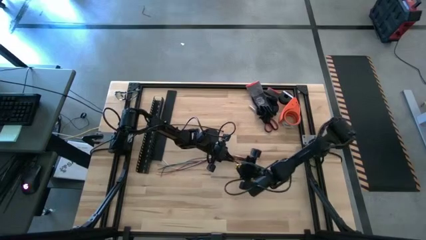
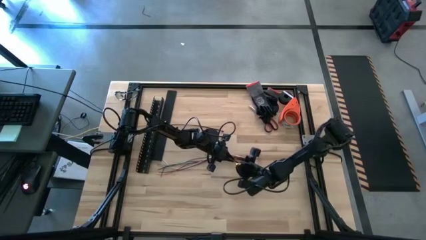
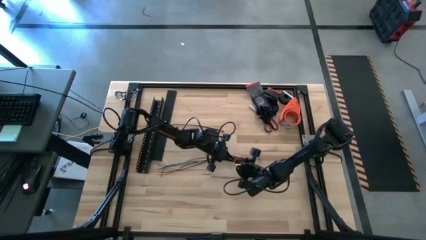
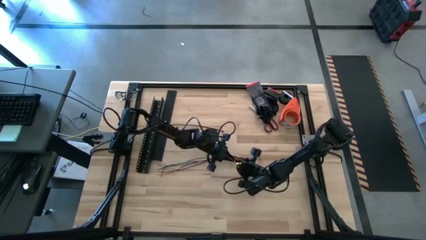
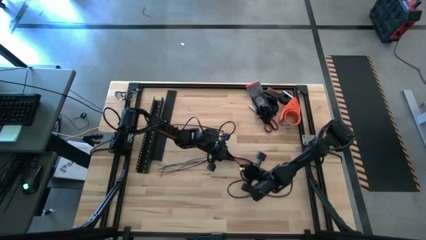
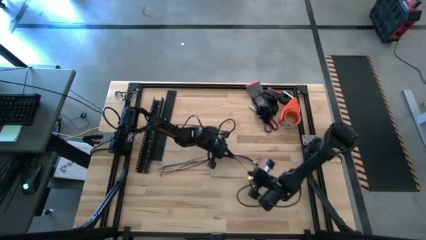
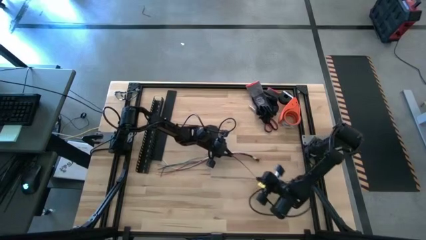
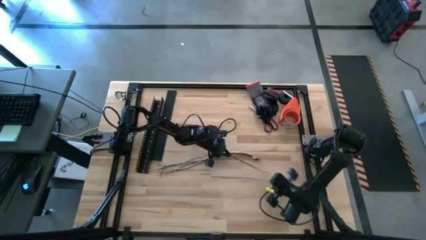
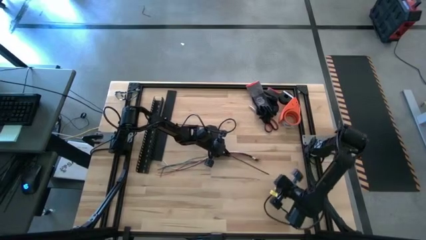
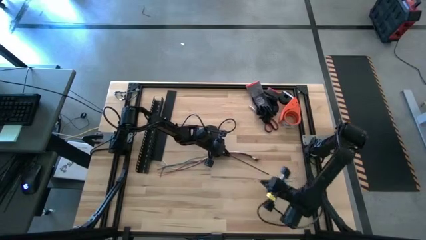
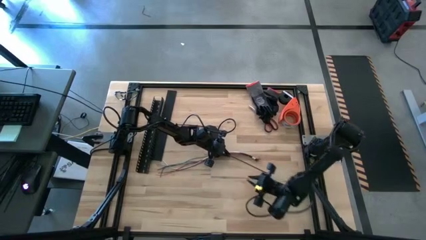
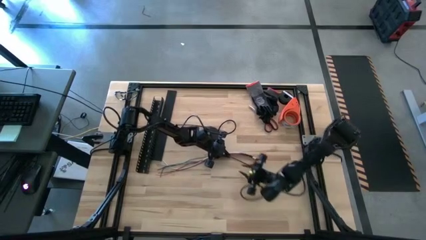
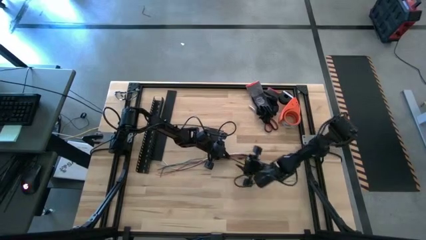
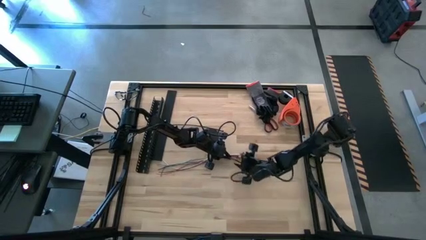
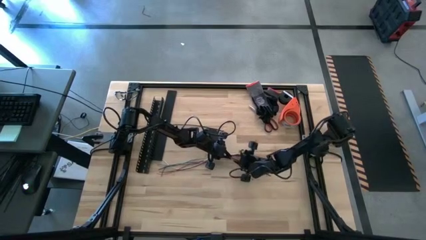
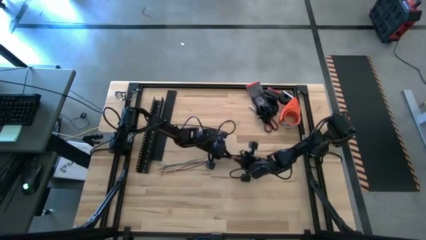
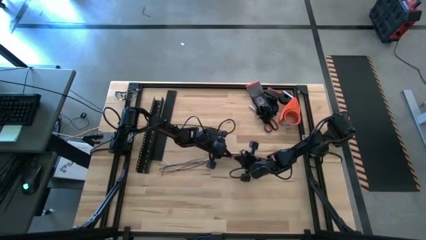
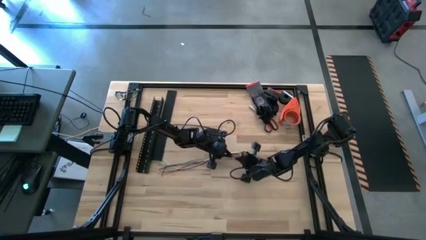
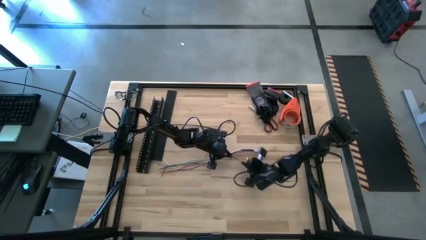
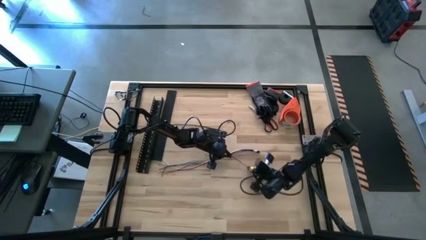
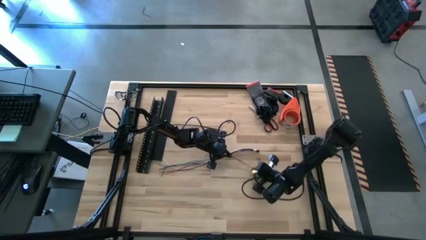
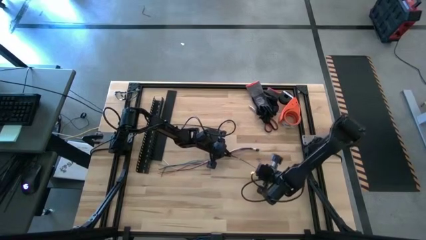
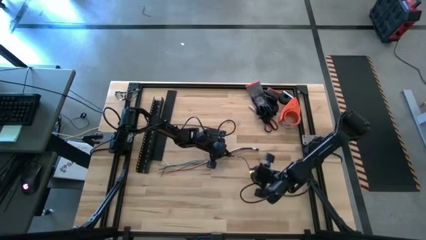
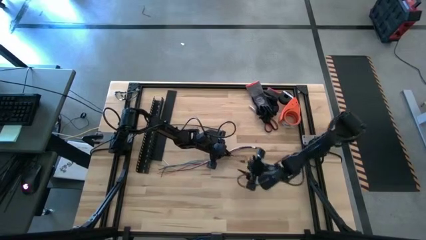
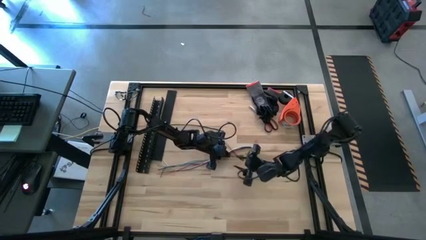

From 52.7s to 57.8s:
Task: Ziptie cables
Wrap the cables together using the left black zip tie

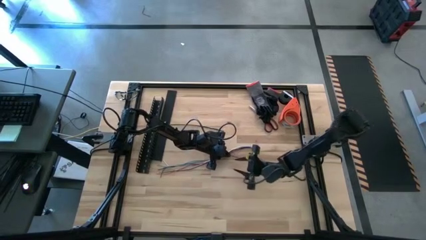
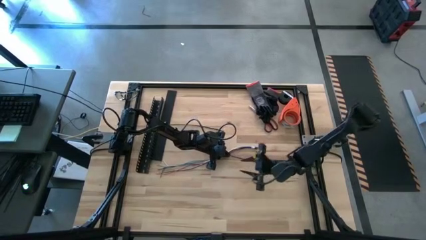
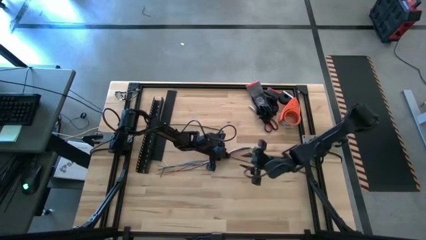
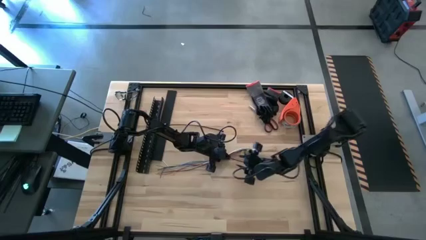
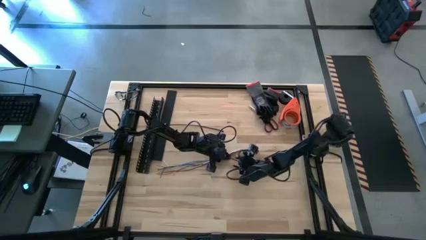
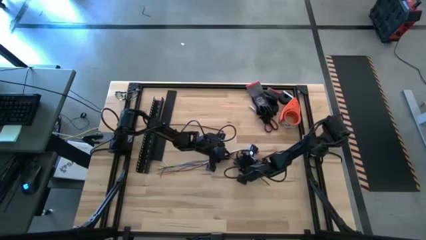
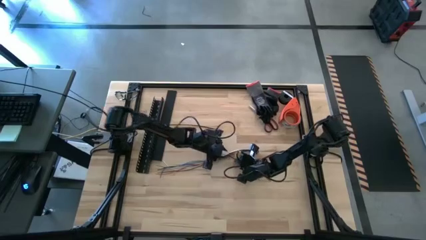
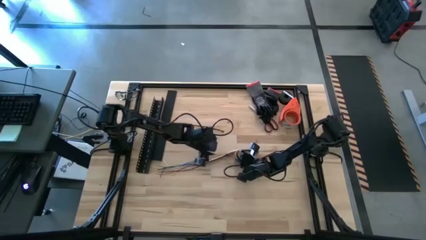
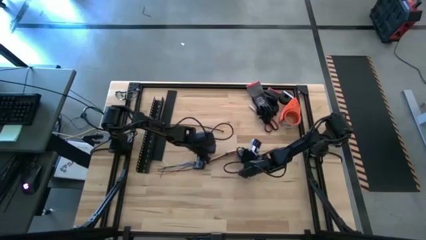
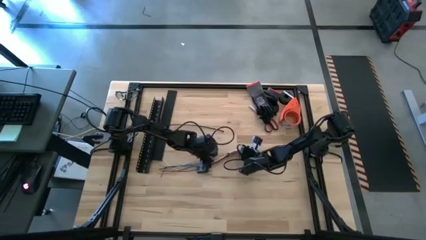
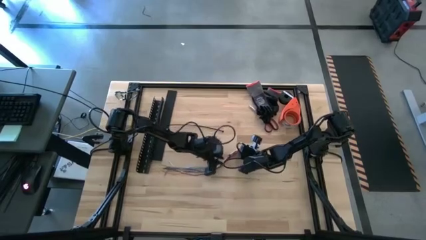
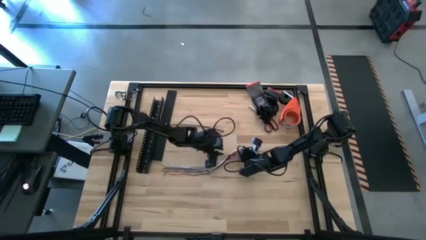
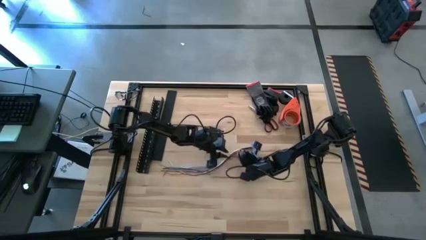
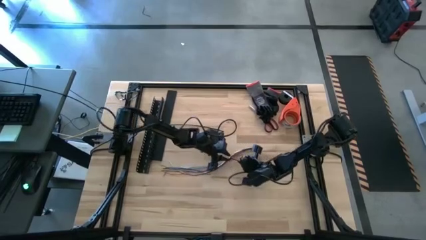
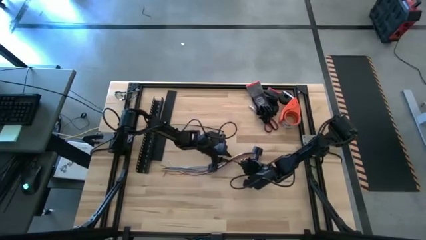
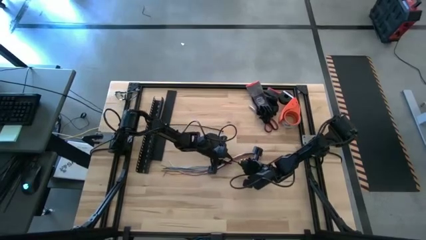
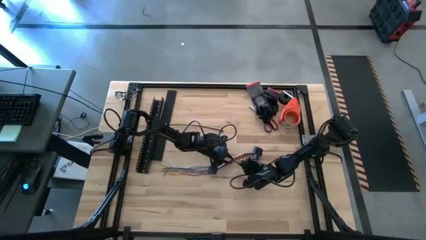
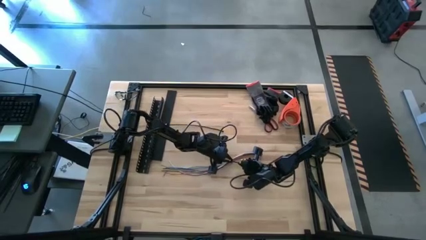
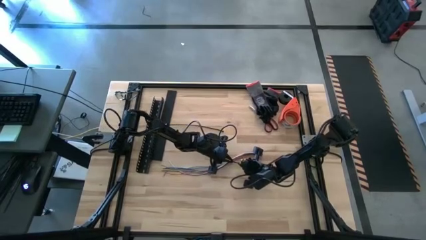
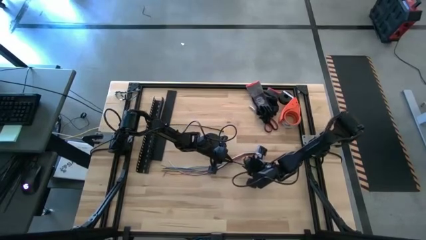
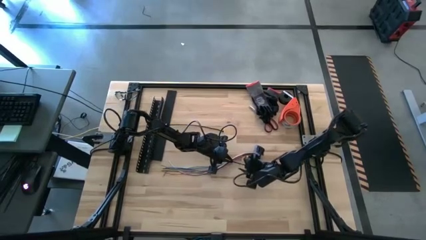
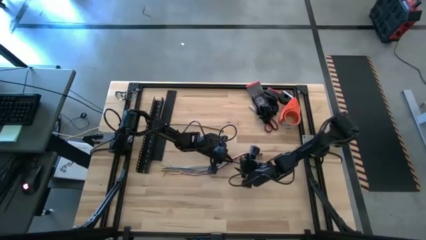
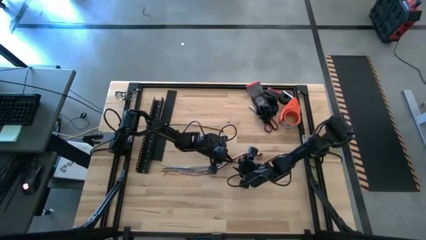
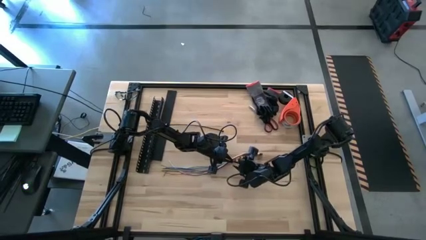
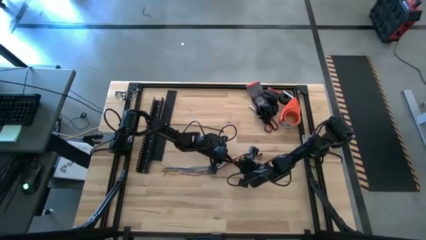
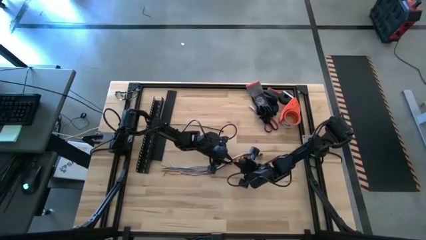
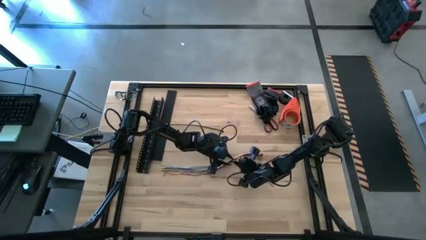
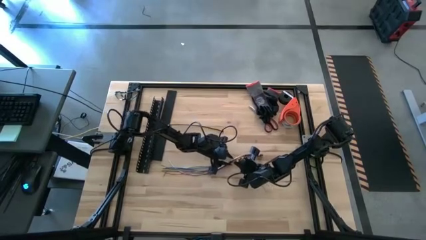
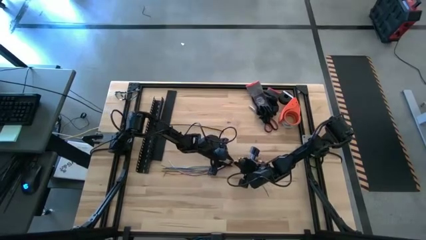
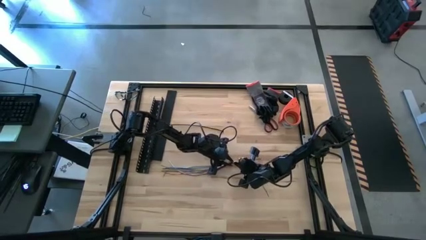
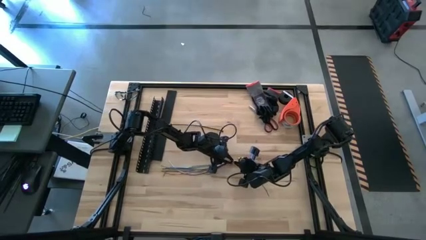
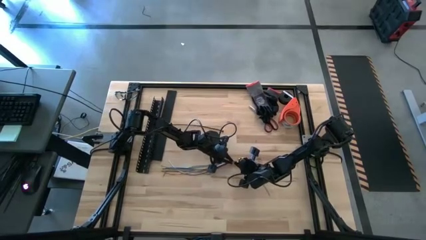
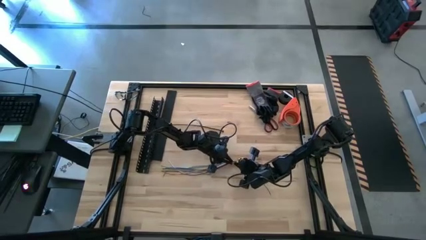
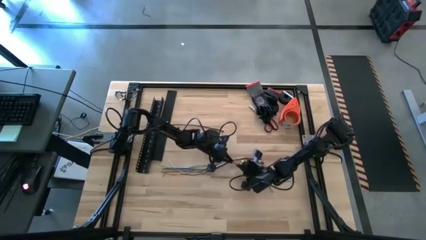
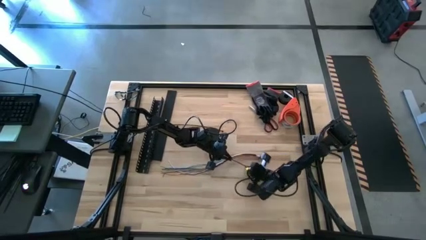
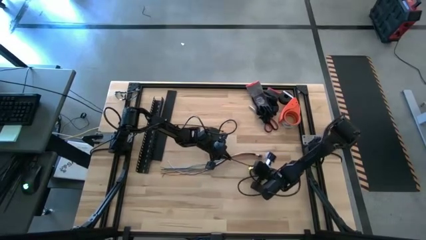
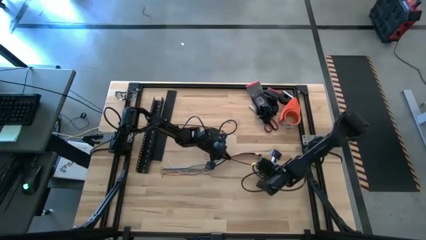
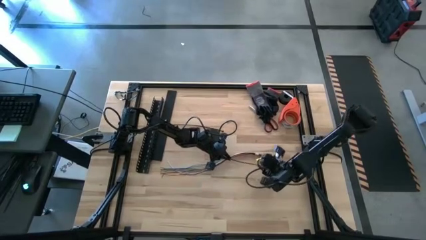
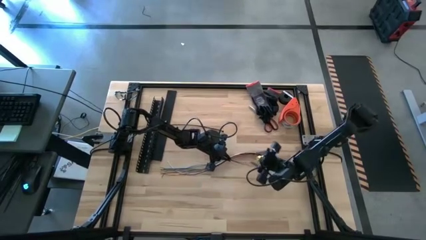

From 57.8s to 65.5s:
Wrap the cables together using the left black zip tie

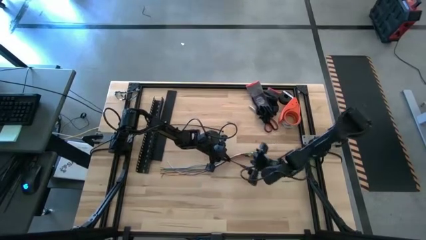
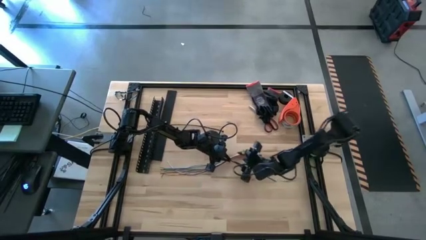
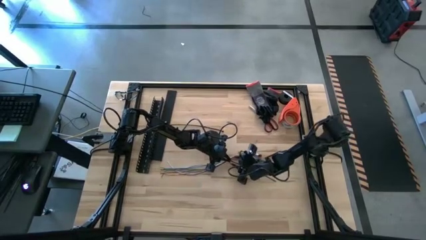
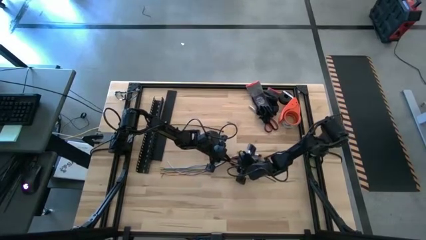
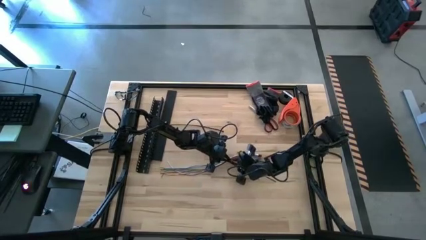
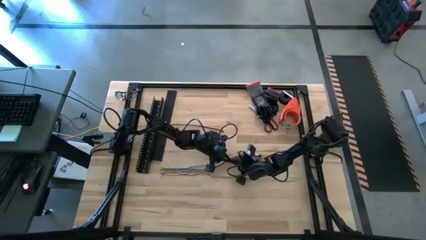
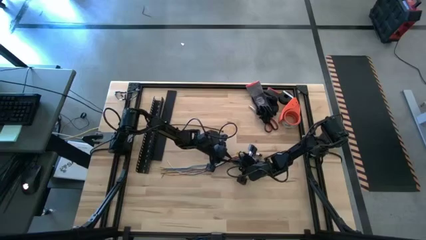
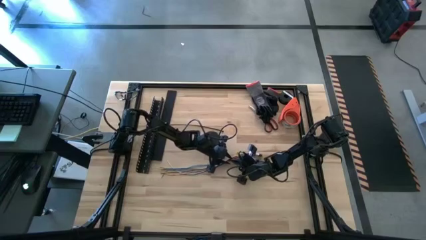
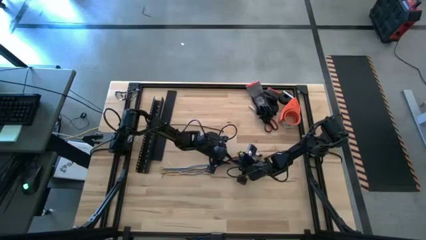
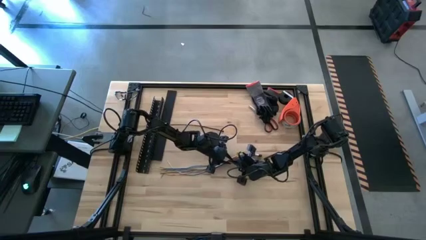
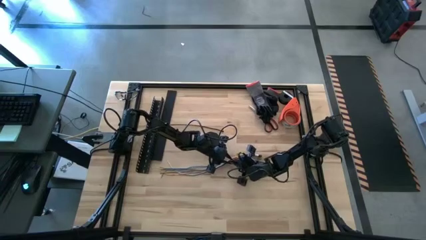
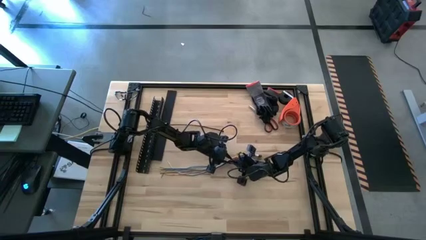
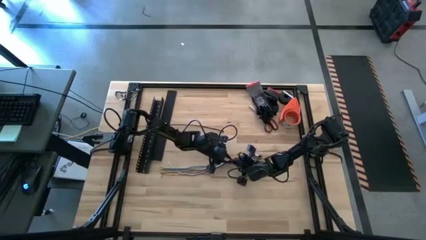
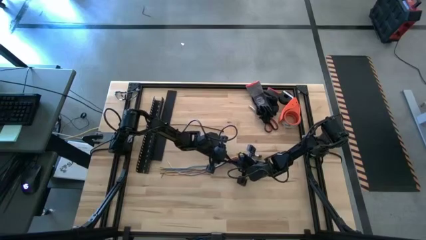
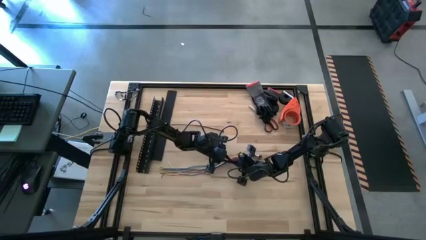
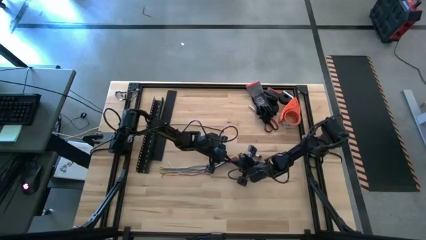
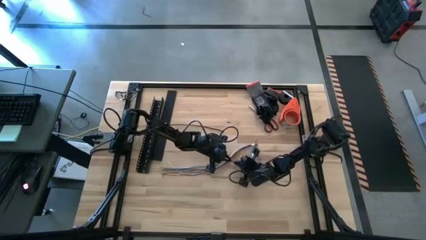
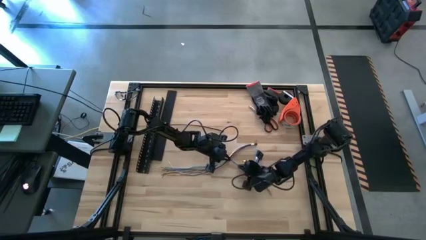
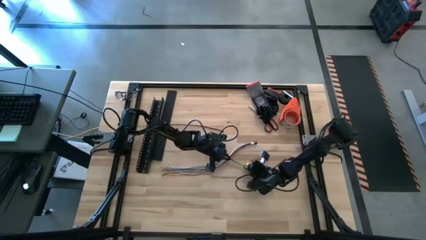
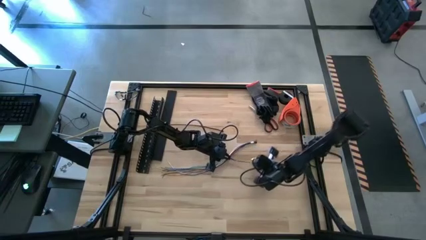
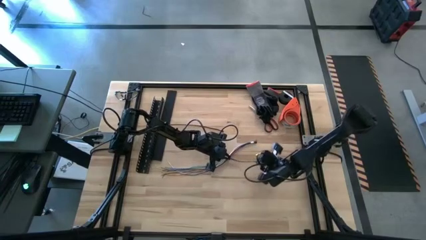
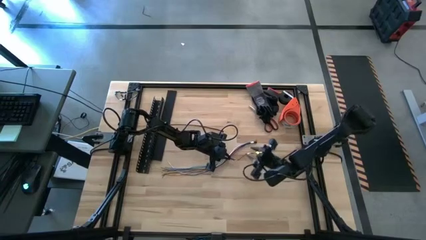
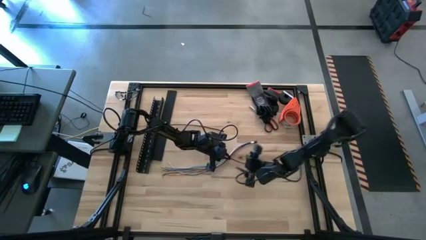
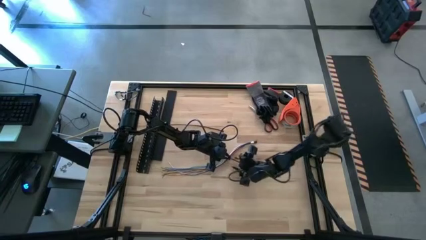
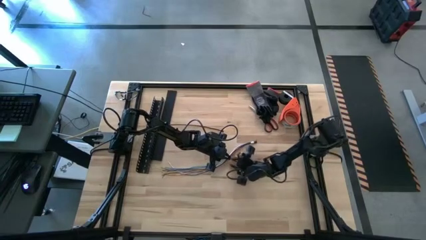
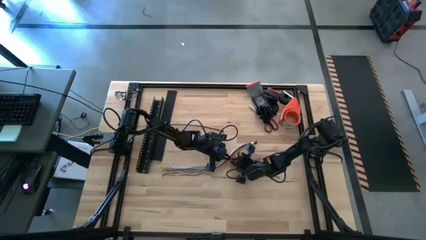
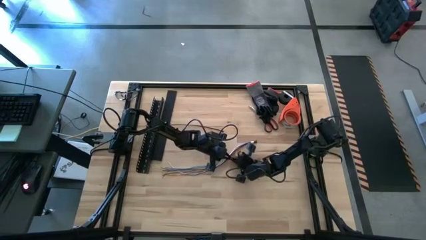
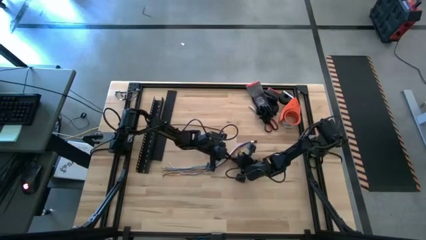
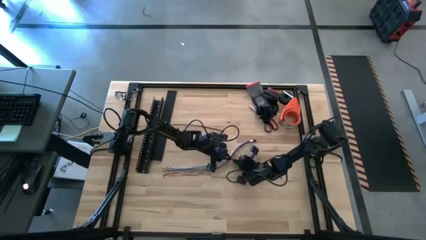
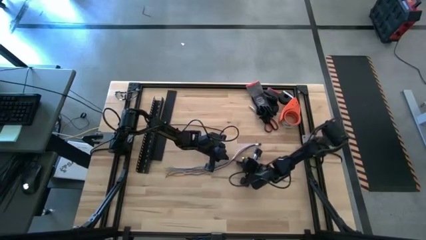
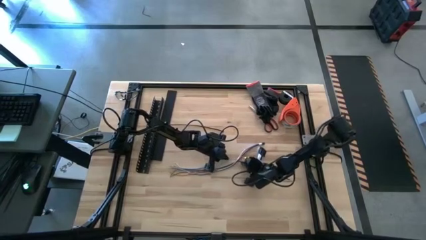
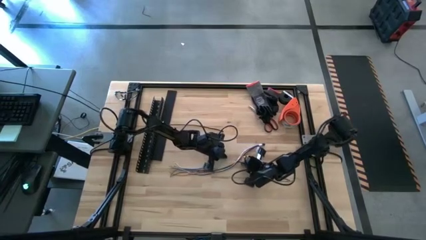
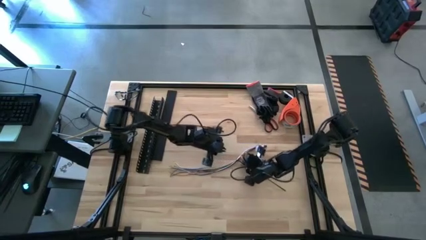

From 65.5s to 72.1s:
Wrap the cables together using the left black zip tie
